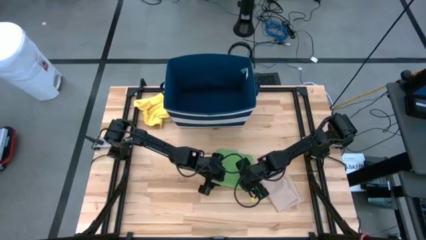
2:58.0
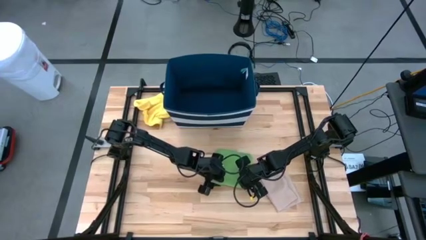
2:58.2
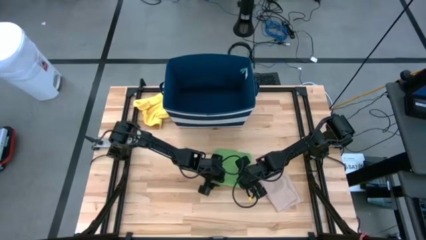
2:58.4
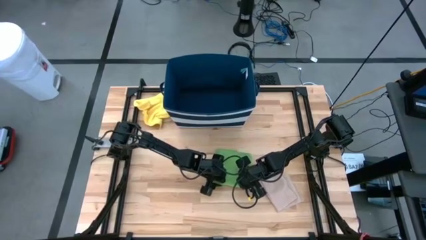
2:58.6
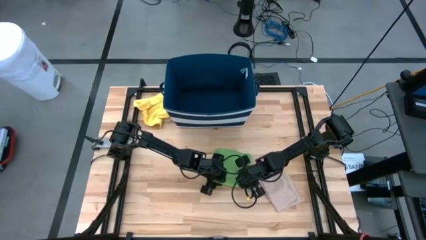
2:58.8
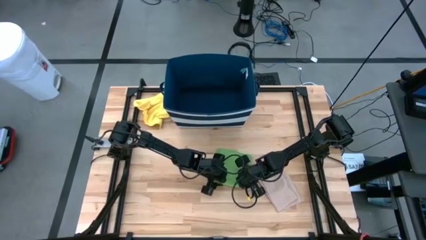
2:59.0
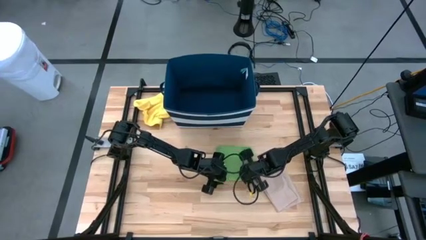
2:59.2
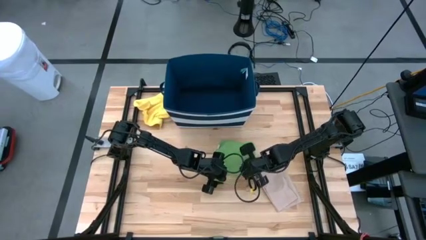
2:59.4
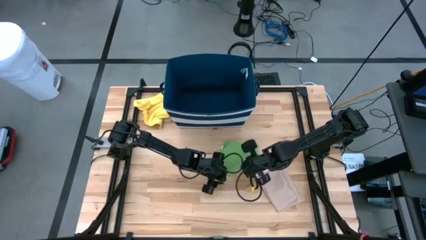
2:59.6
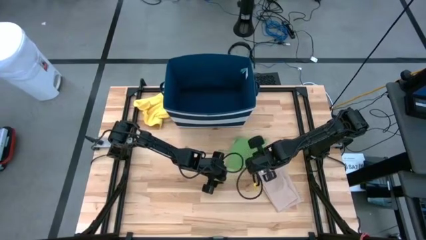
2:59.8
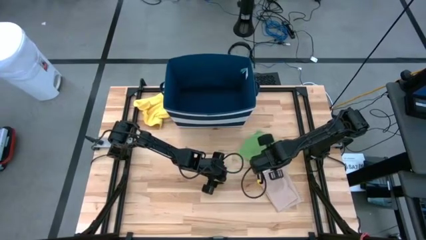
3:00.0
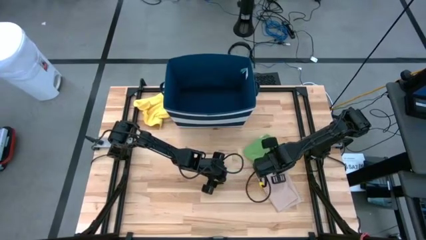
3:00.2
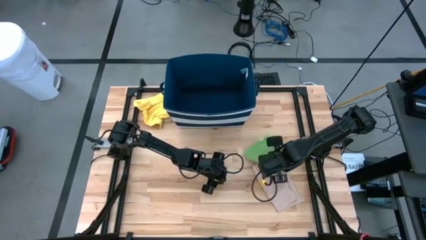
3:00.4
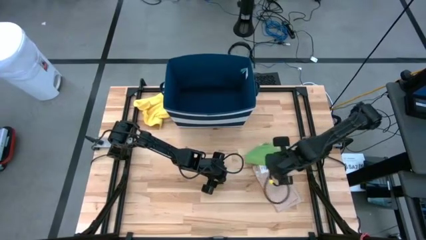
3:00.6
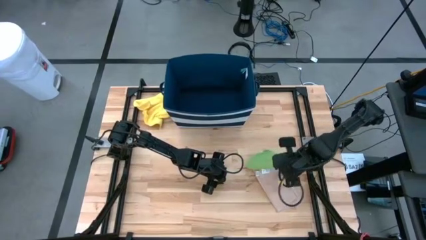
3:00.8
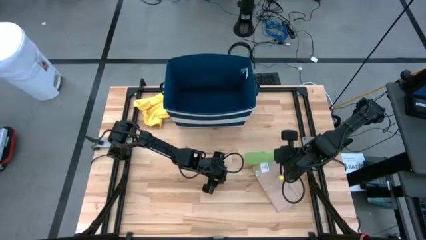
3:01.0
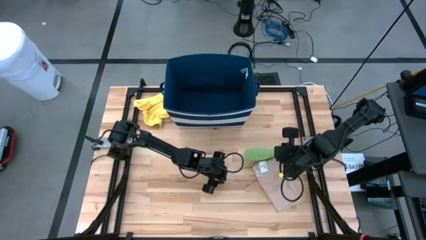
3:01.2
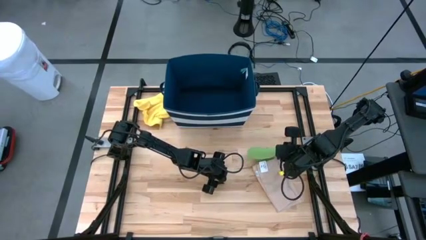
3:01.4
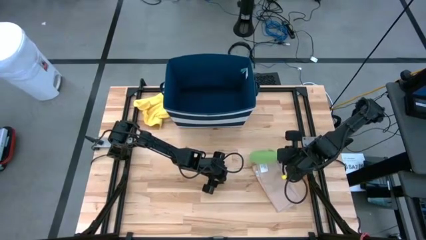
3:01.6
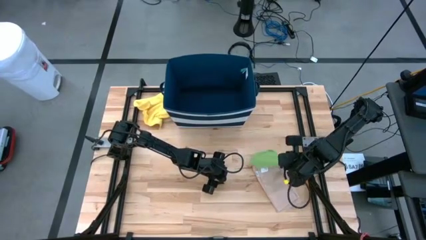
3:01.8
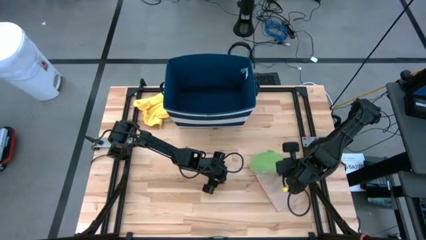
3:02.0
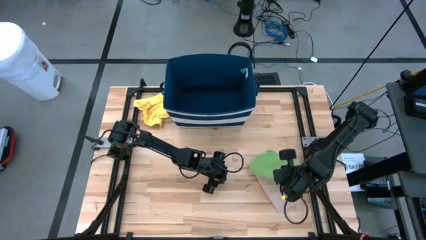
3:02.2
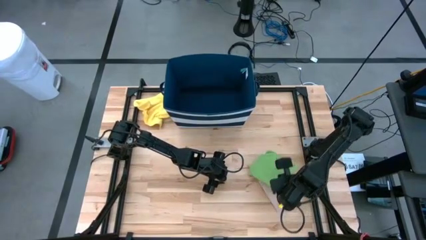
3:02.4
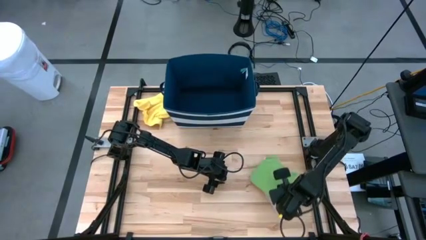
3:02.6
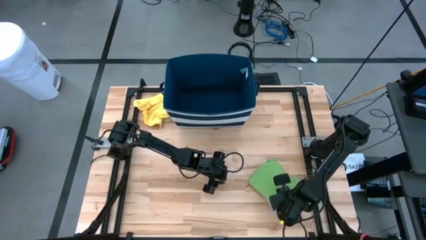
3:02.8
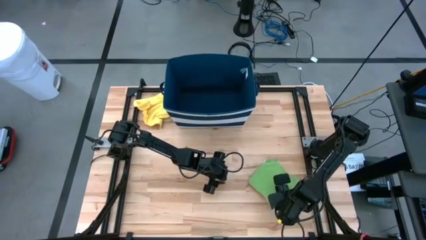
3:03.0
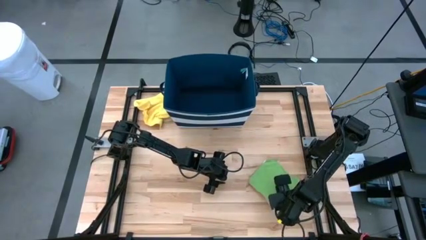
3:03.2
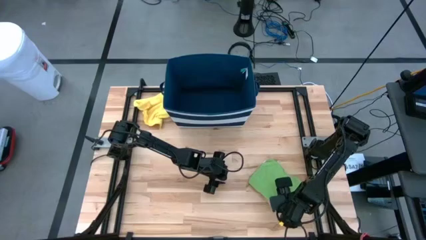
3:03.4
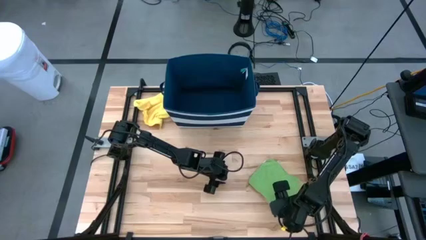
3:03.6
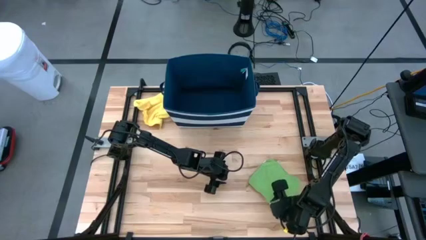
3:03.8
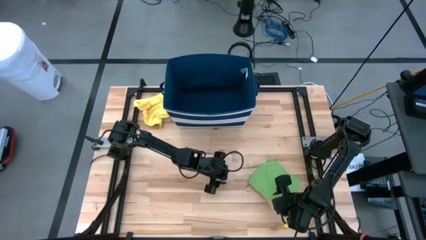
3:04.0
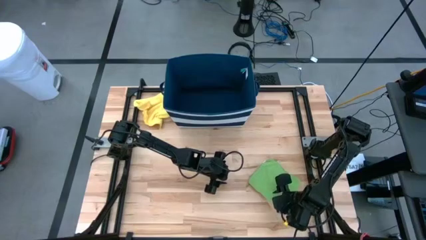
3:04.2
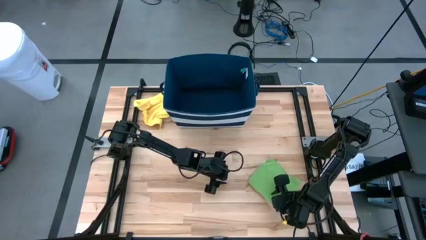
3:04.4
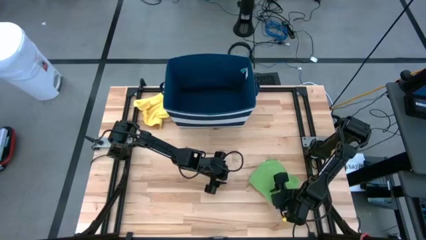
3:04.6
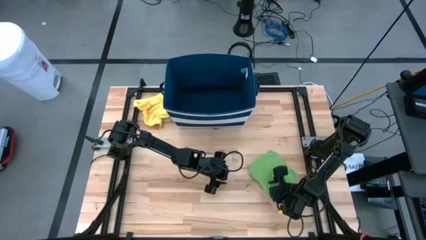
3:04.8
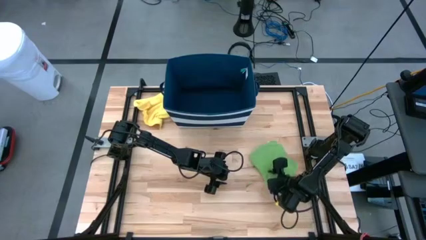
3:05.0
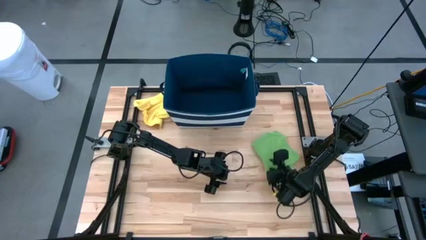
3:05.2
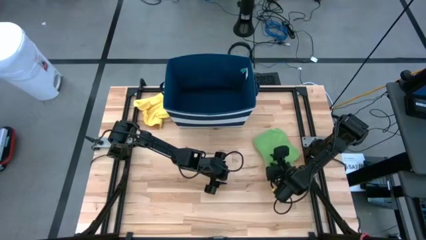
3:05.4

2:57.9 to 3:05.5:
Task: Fold towel
Stack the green towel on the brown towel

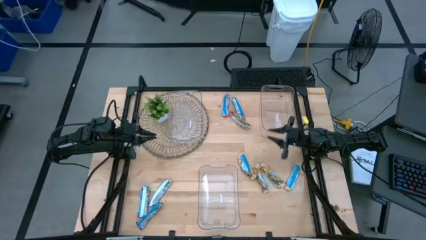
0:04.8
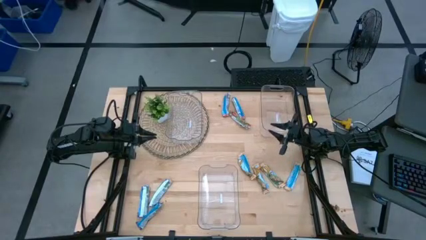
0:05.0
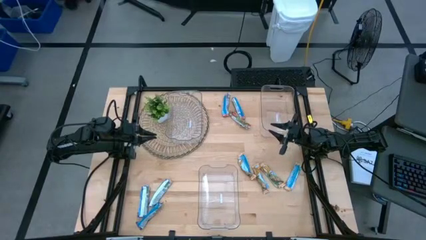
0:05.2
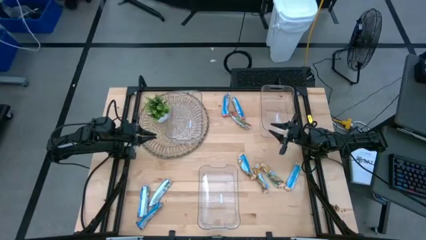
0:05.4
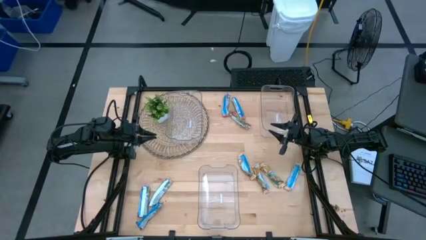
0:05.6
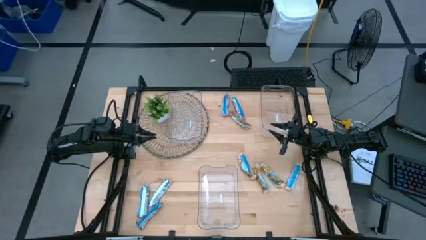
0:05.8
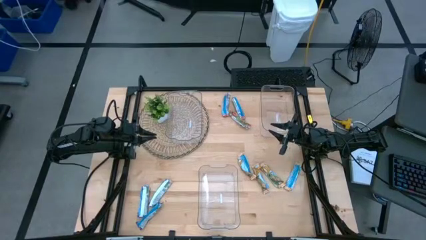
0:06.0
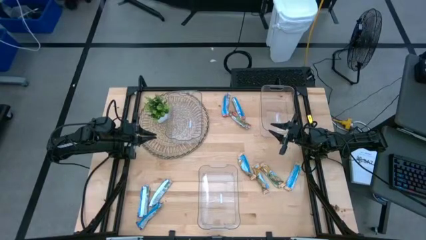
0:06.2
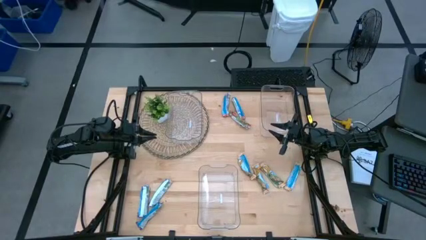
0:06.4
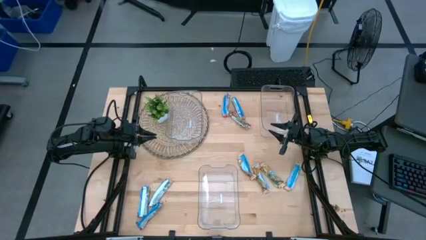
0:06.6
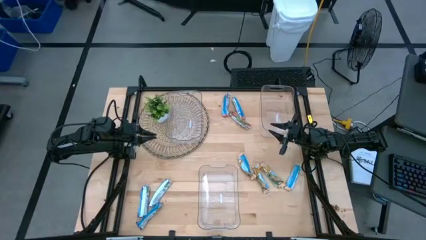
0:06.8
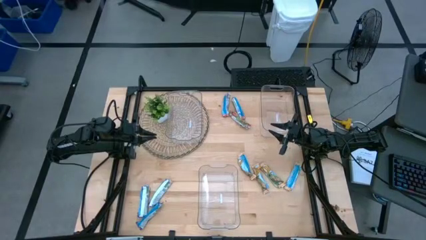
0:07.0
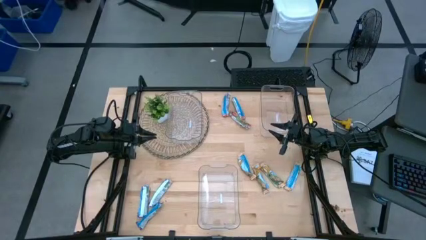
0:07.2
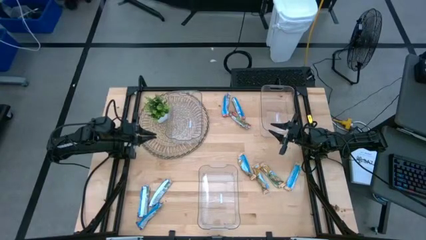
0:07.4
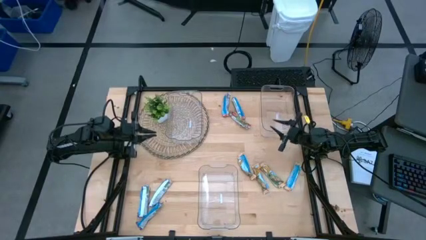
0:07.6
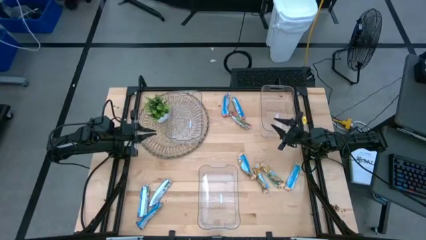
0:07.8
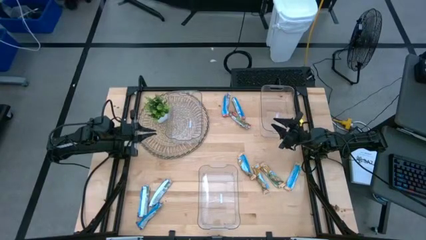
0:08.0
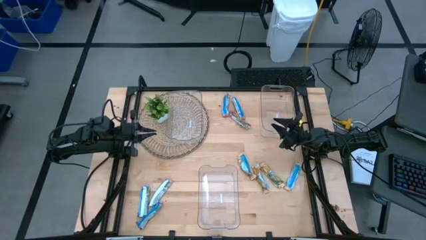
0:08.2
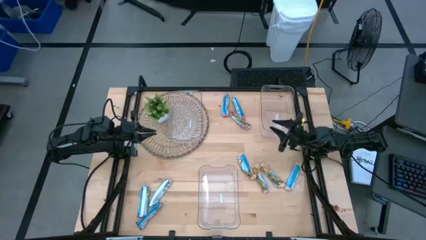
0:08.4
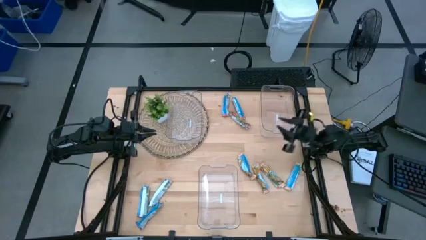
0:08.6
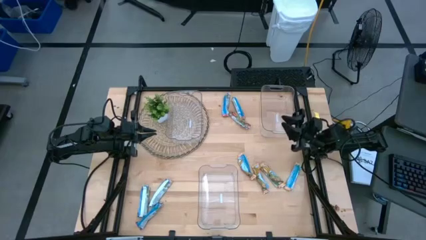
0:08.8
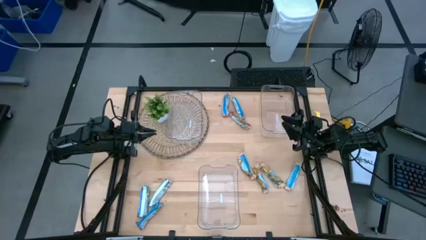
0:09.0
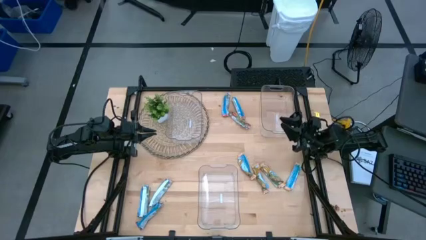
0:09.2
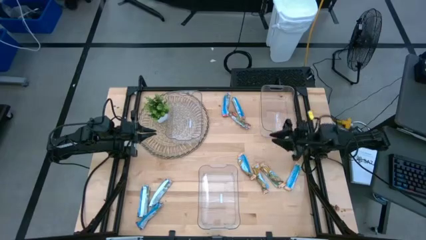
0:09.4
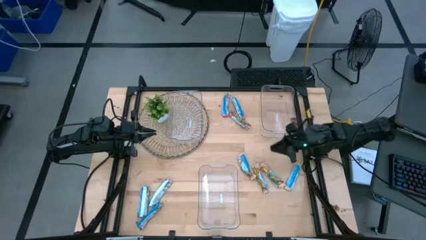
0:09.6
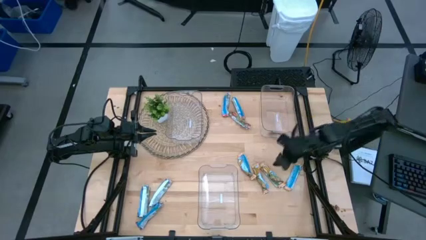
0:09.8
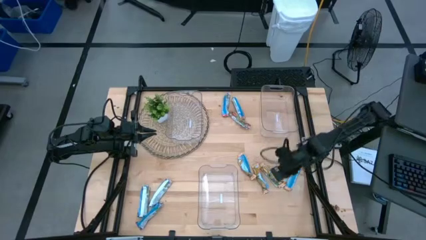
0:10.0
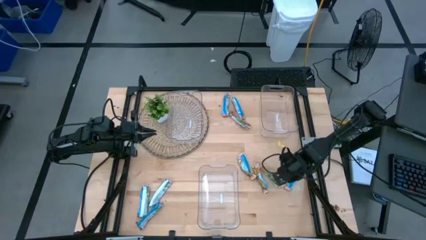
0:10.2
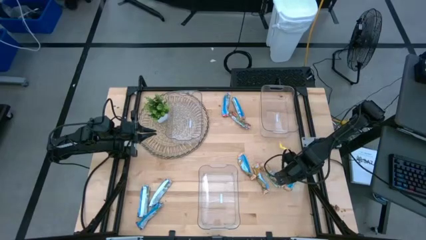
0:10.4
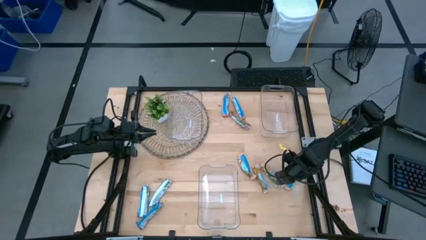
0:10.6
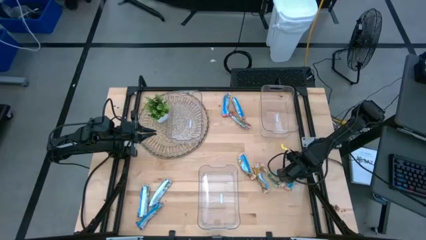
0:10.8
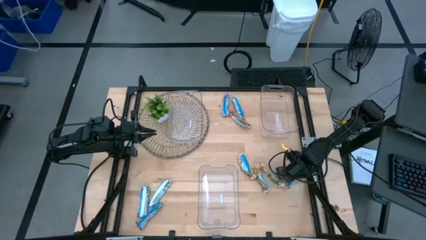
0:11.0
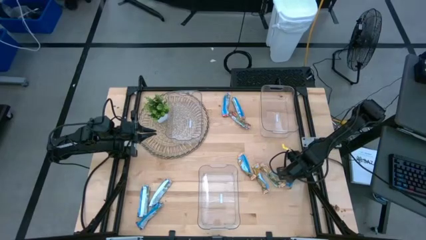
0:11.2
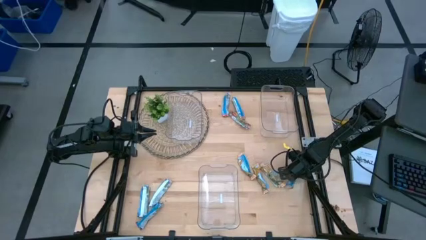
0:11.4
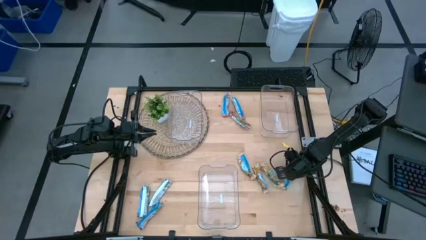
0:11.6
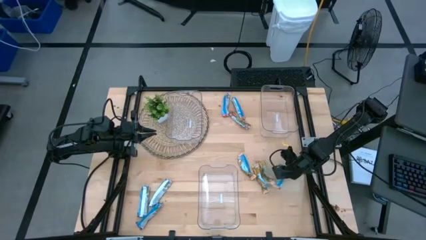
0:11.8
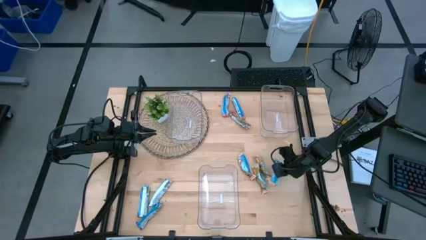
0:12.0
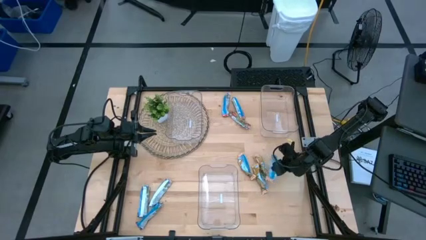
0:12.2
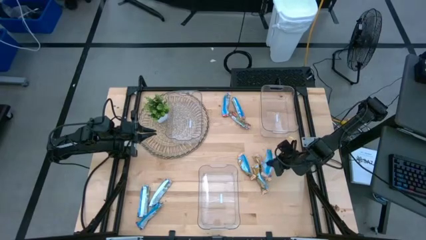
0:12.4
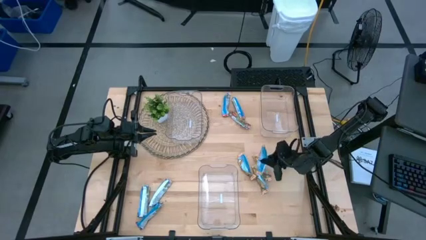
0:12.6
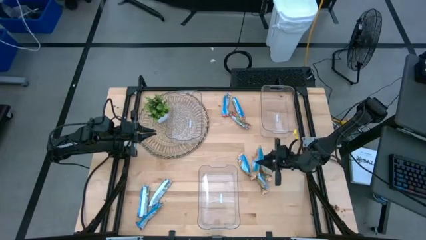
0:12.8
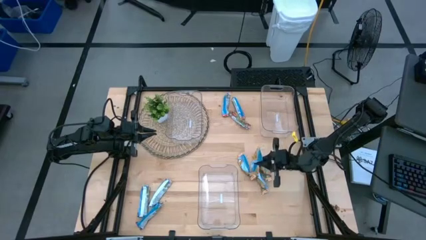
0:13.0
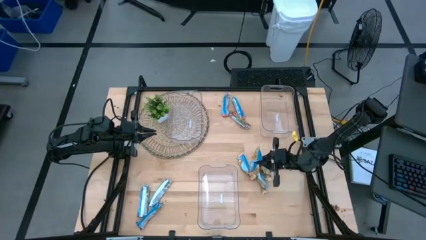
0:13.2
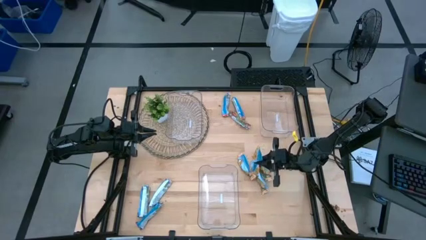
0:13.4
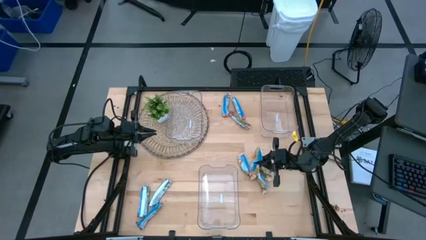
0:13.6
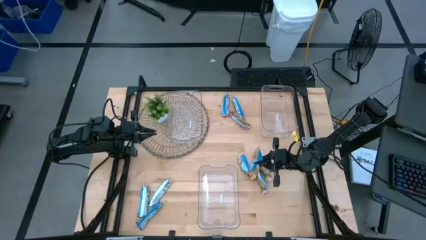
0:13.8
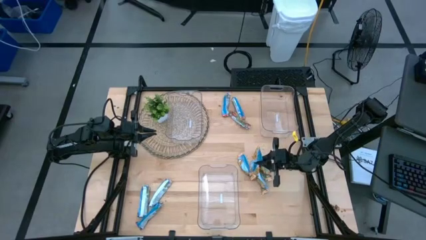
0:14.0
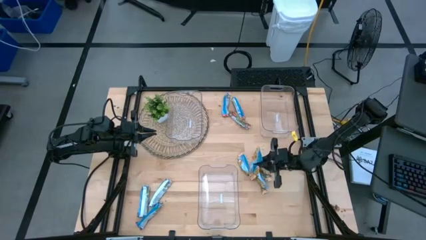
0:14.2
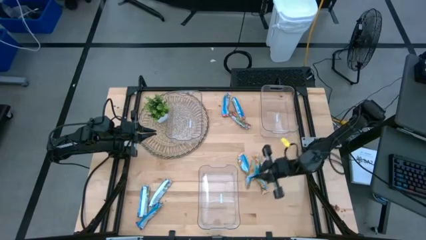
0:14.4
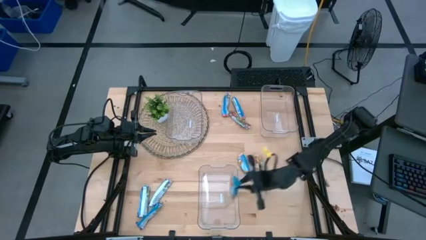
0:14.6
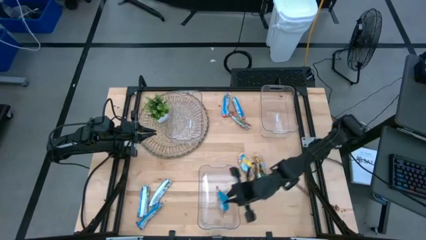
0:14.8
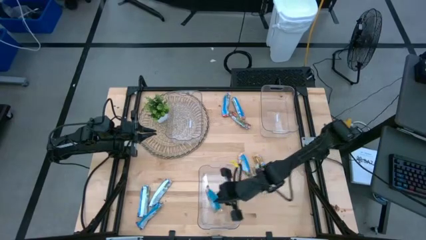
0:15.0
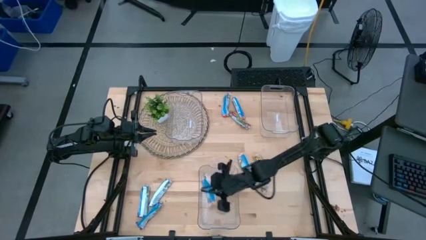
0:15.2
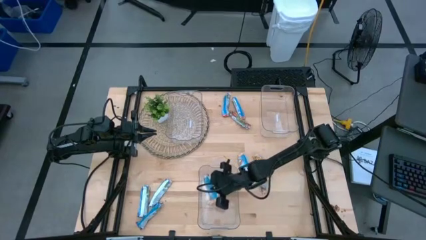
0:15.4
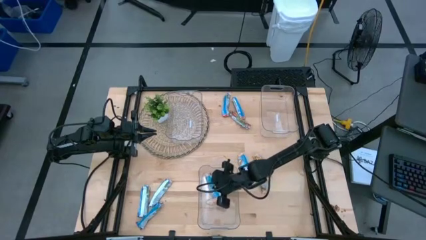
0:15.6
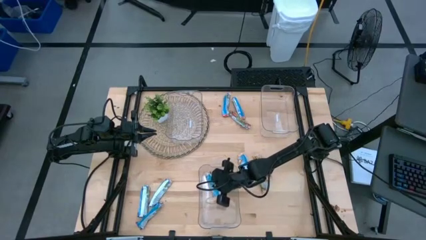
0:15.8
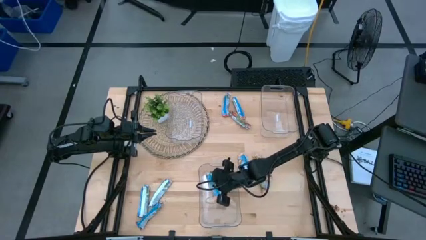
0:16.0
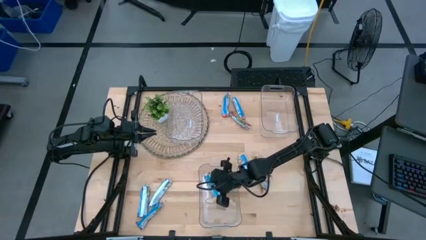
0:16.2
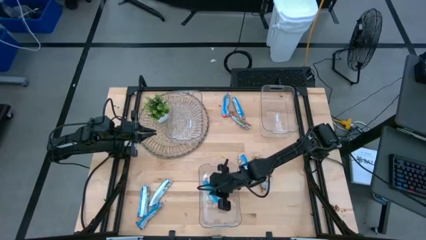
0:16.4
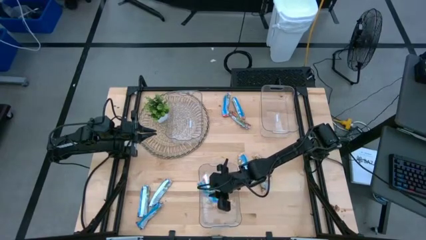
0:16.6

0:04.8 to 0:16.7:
Task: Pick and place Granola Bars by type
Put the yellow granola bar into the bottom transparent bin
